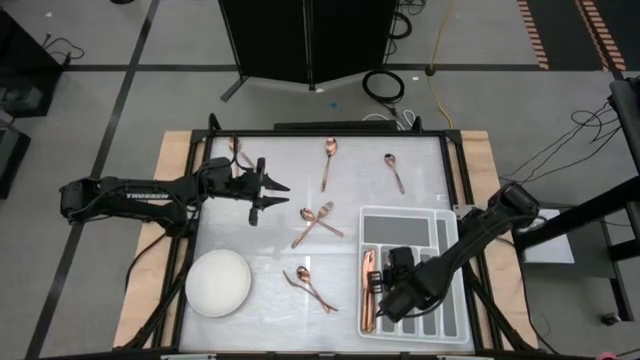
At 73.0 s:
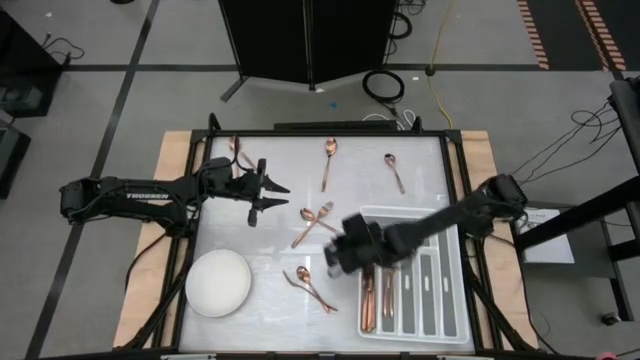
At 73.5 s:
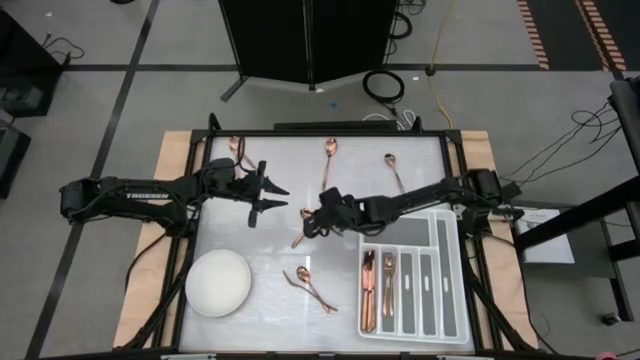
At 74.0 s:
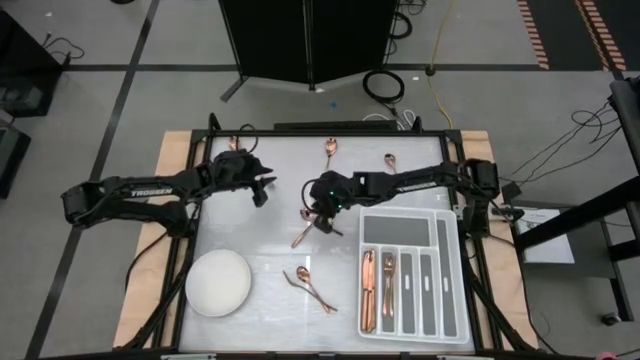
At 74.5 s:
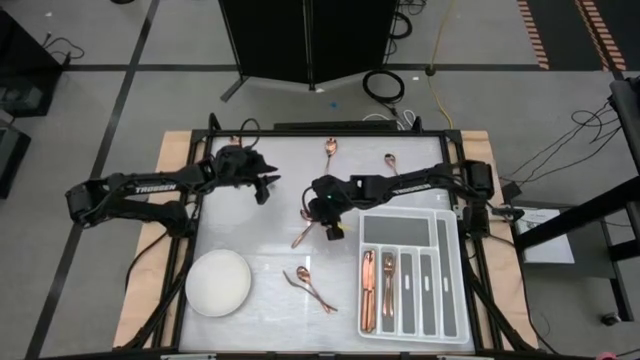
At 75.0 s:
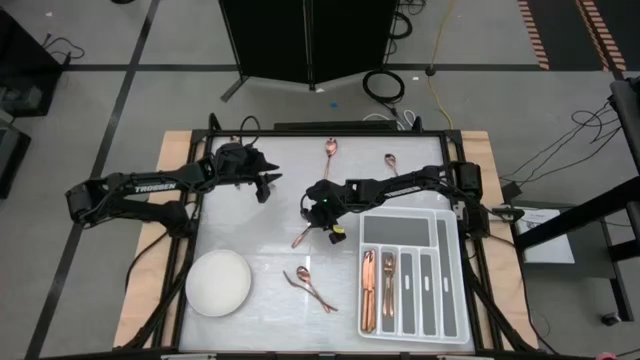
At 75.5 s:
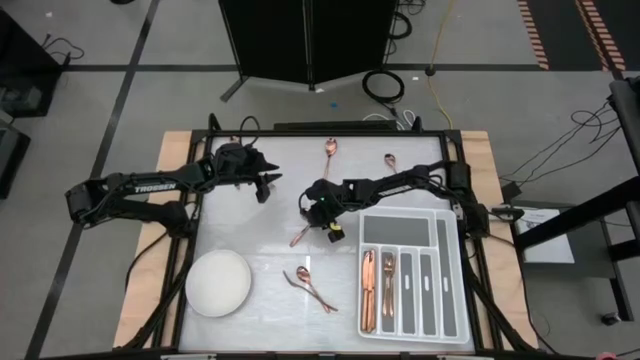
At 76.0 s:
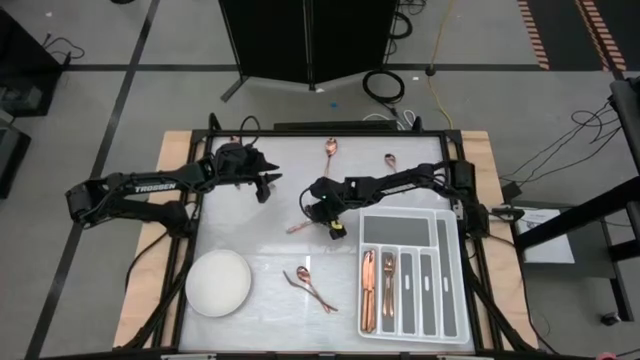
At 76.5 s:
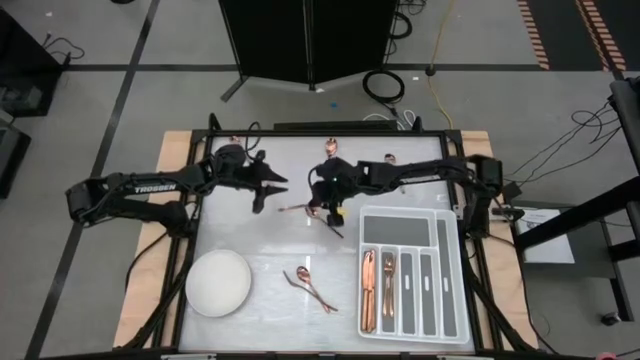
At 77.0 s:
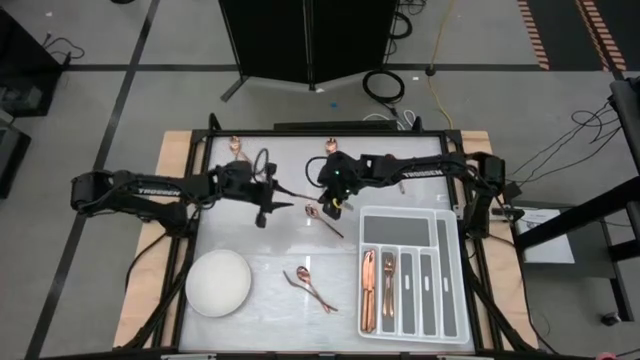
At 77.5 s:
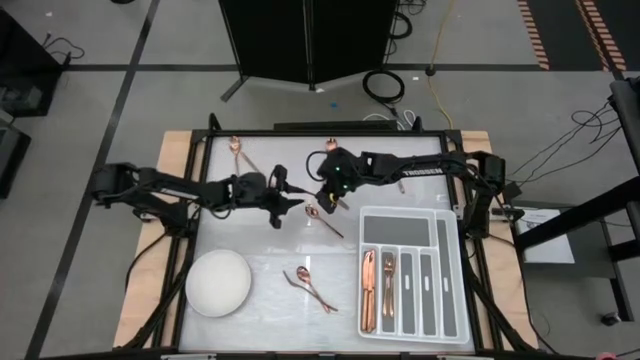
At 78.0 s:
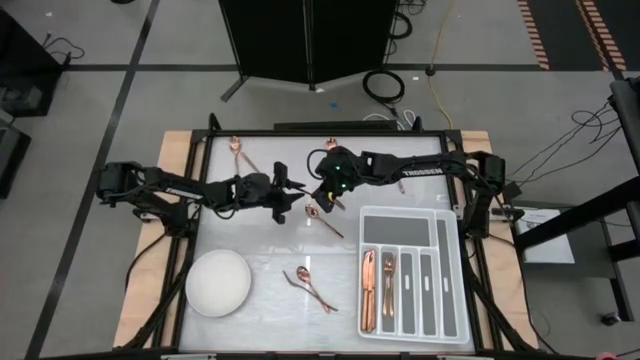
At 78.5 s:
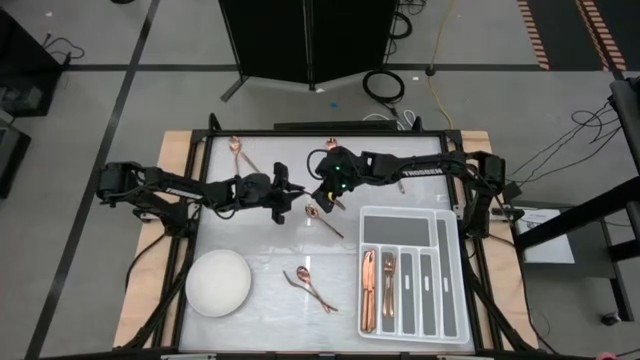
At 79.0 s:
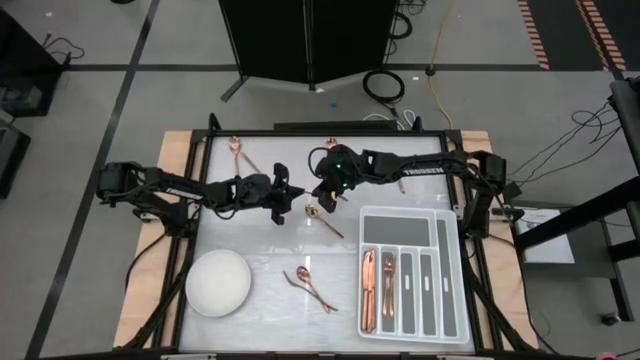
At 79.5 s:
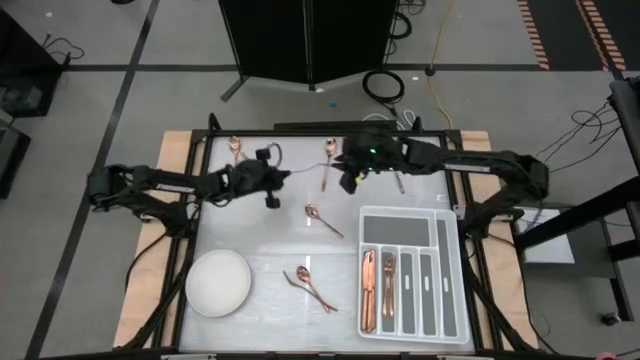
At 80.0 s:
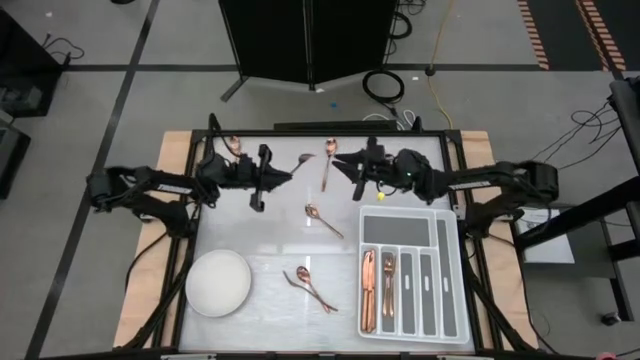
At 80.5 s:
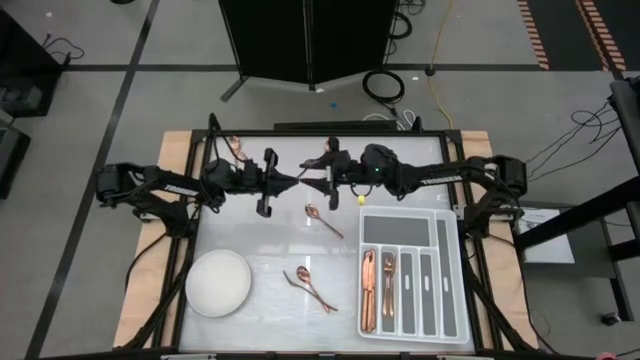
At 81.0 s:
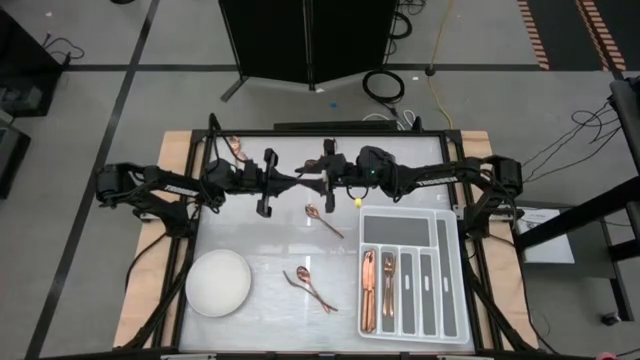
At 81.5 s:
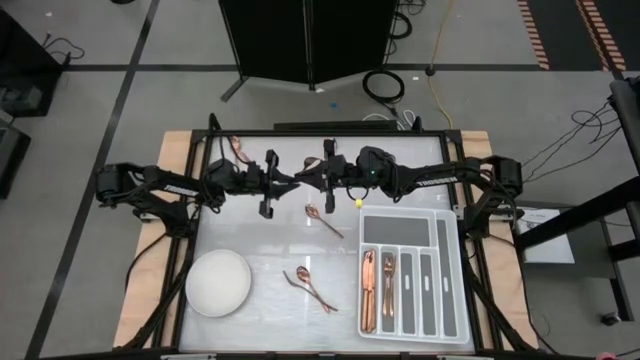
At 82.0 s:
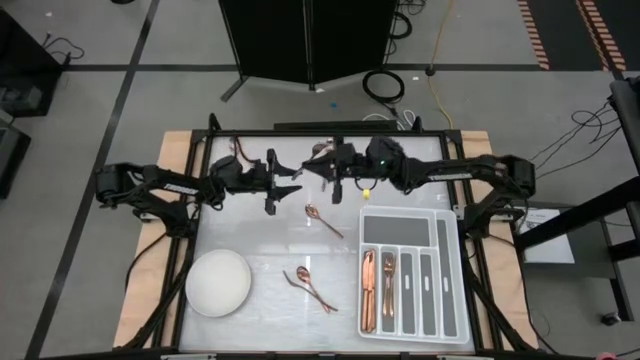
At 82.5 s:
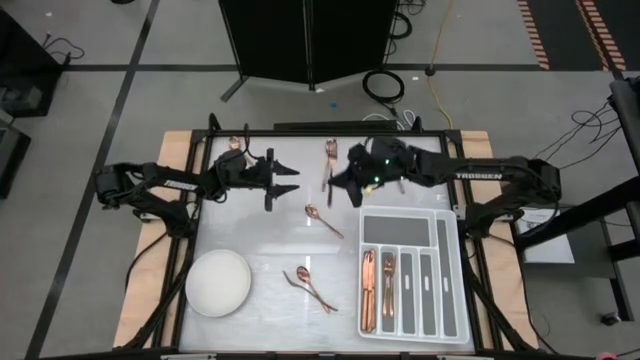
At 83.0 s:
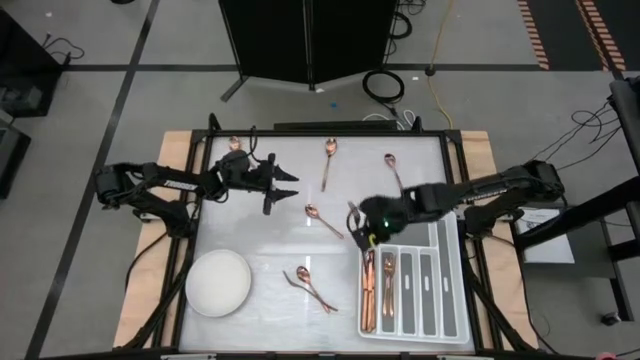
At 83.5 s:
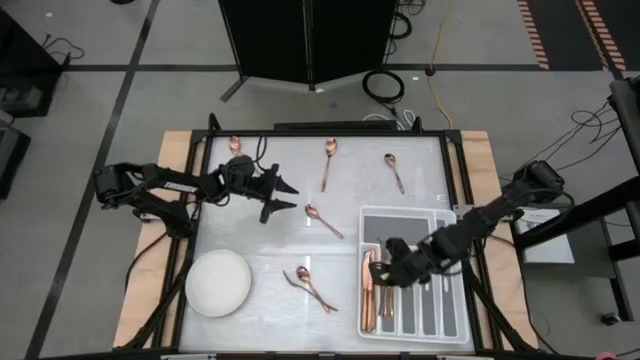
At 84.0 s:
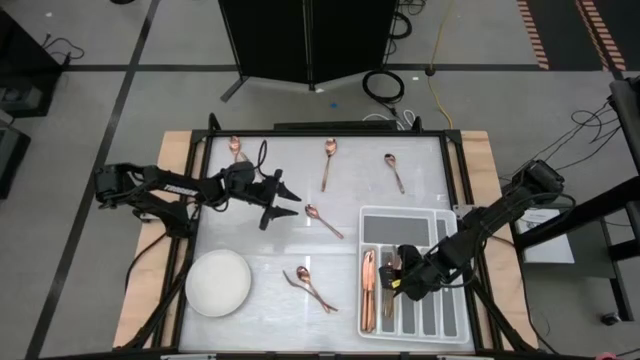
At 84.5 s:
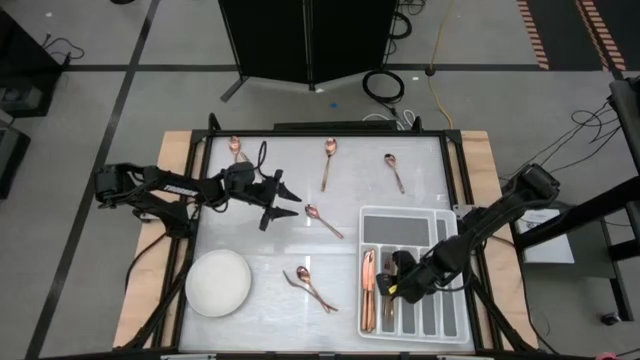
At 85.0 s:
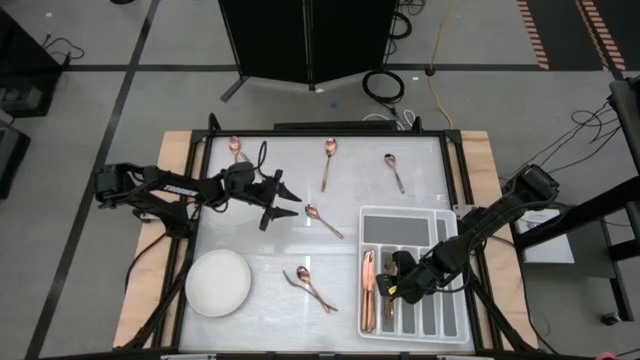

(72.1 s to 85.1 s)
Task: Sort silverware
Put the middle brown in the white silverware organizer

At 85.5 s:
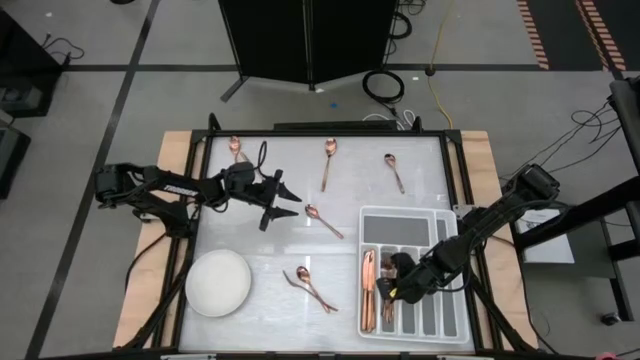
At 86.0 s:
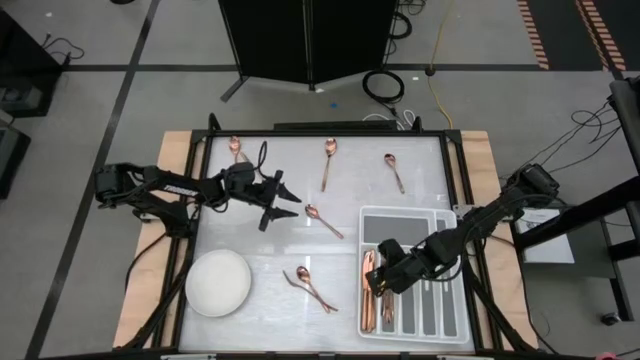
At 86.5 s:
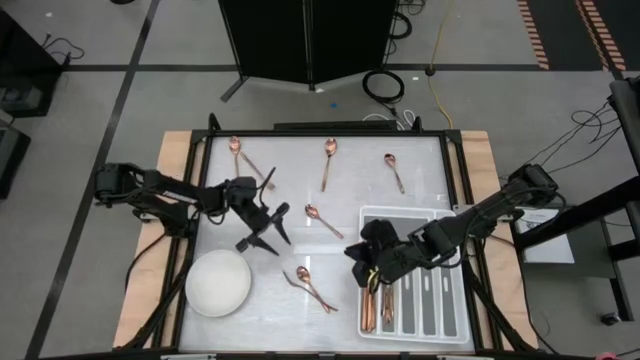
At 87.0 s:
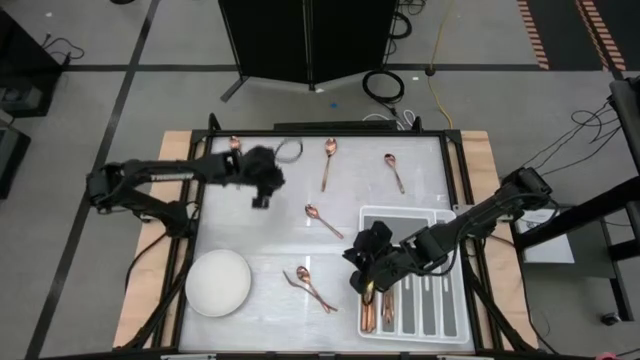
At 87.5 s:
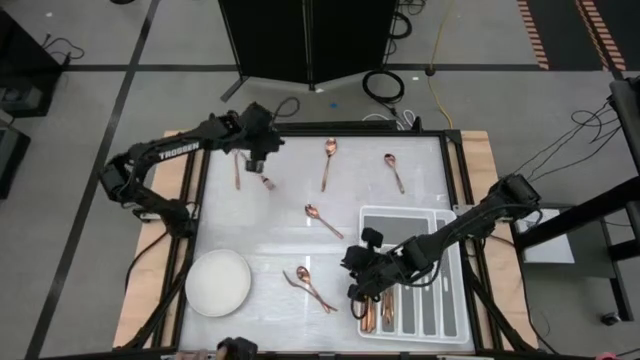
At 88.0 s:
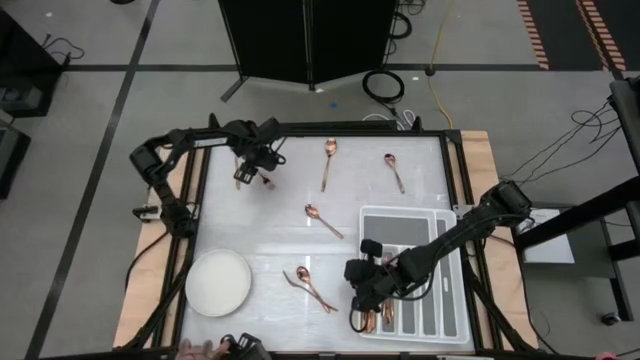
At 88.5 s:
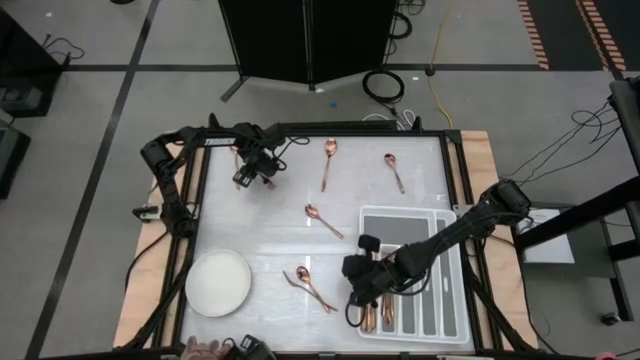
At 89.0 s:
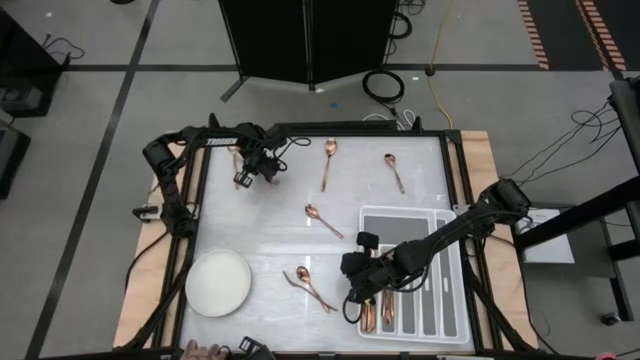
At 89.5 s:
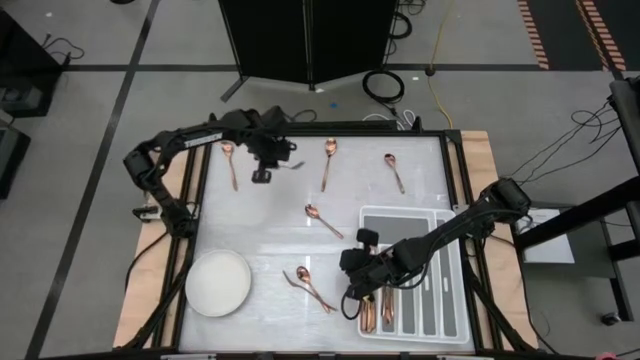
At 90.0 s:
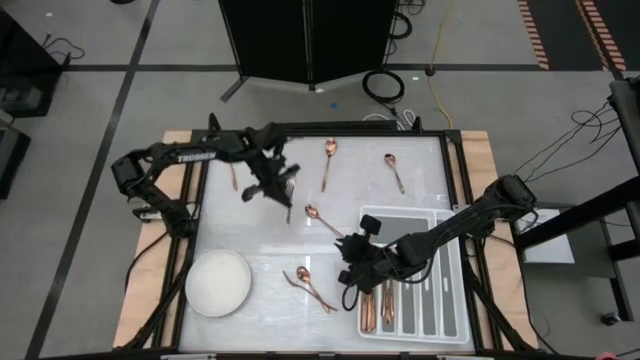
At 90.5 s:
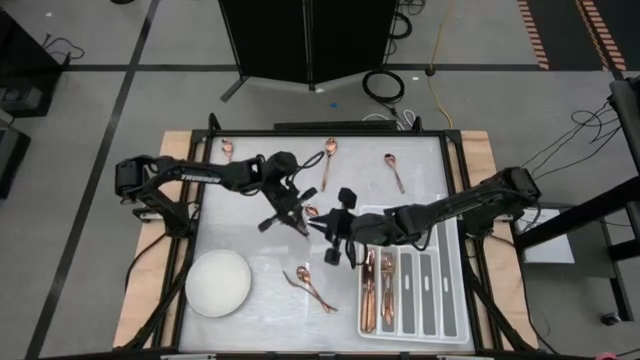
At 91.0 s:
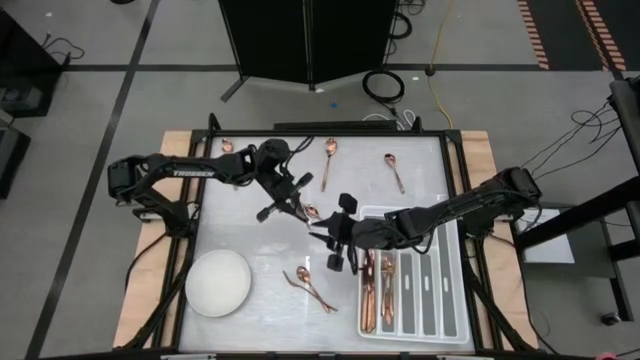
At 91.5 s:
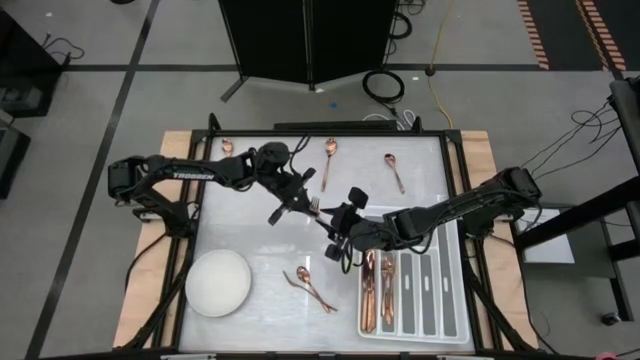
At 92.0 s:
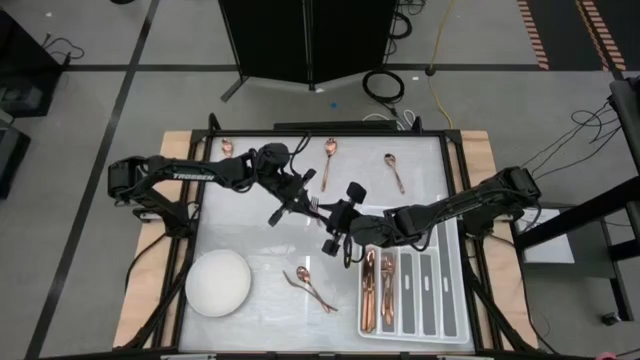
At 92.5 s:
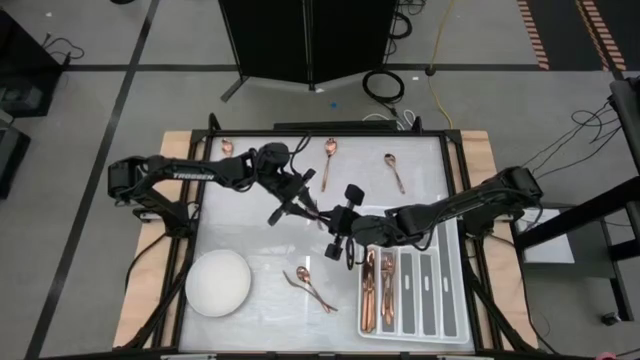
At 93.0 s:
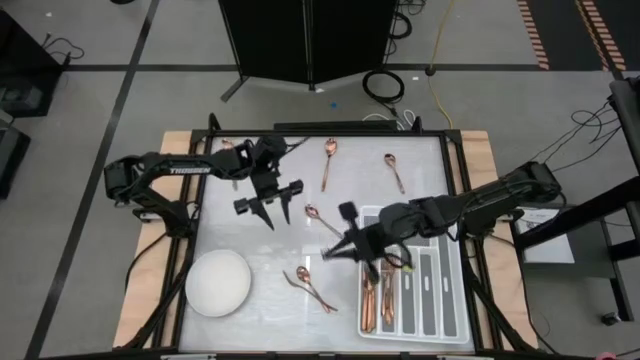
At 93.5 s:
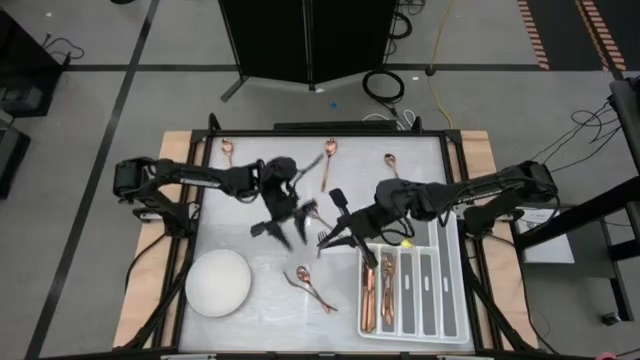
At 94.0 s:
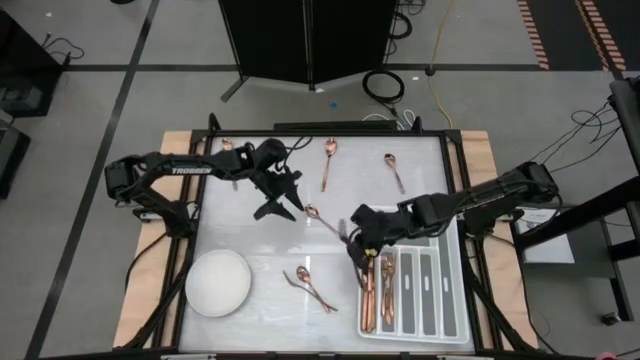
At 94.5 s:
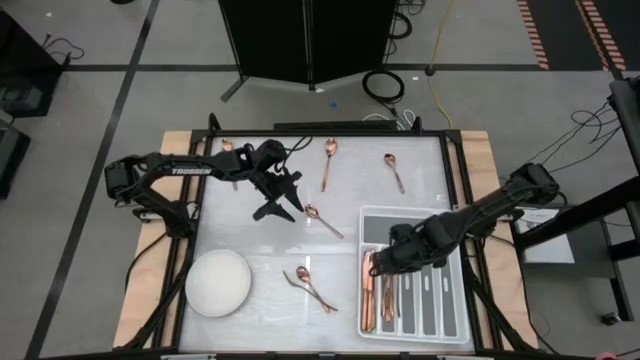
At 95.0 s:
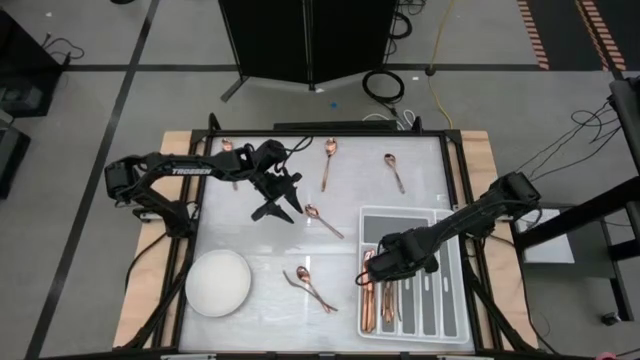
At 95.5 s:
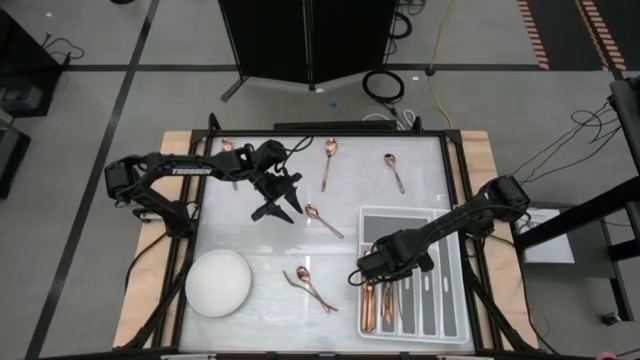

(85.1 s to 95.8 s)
Put the top brown fork in the white silverware organizer
